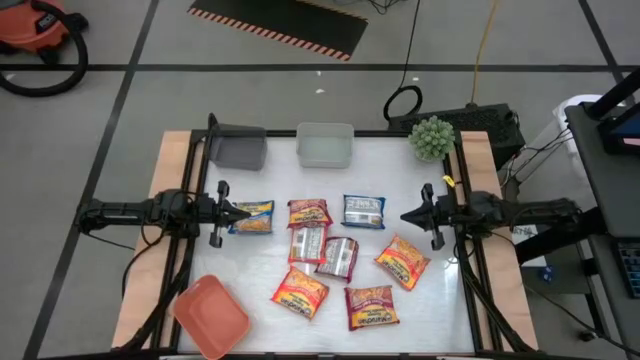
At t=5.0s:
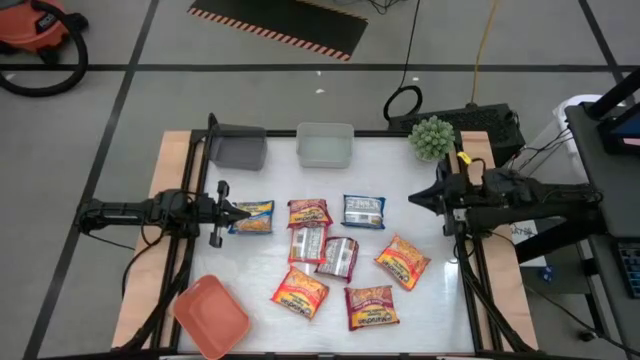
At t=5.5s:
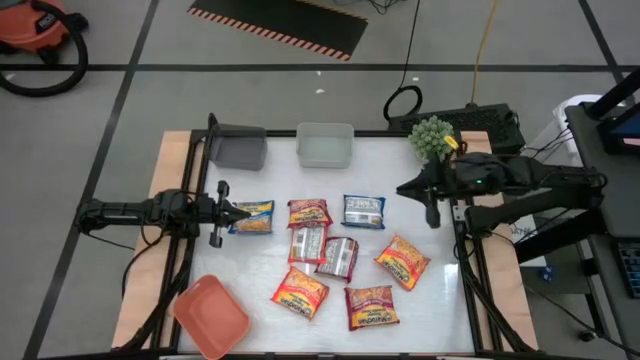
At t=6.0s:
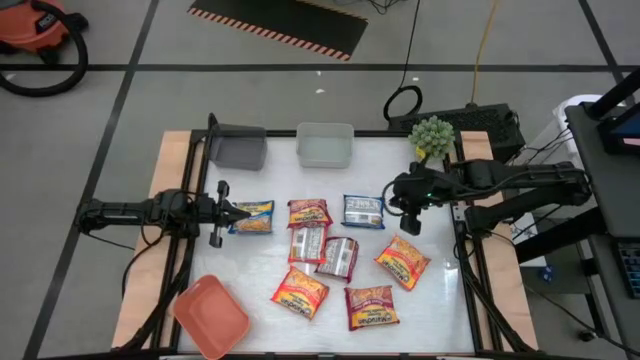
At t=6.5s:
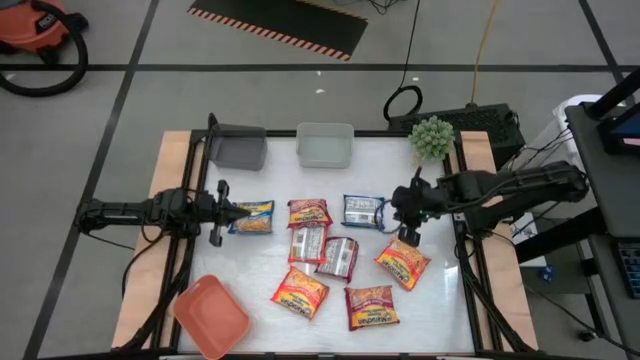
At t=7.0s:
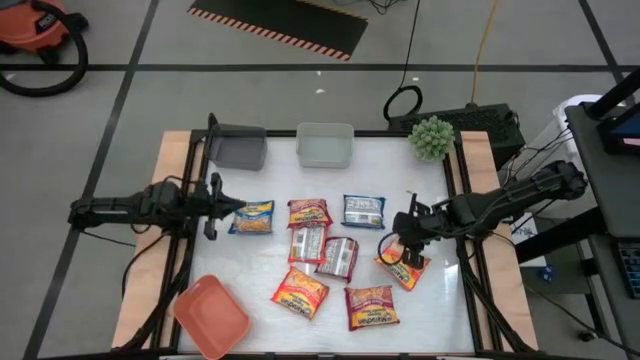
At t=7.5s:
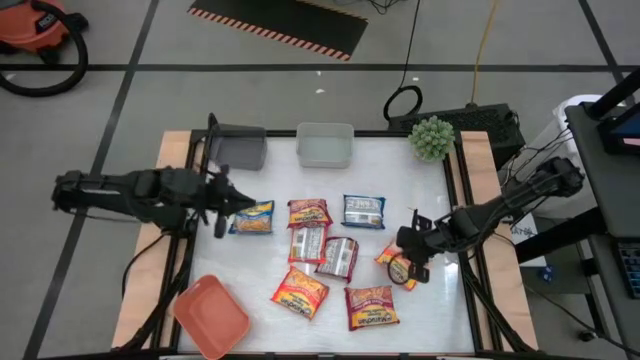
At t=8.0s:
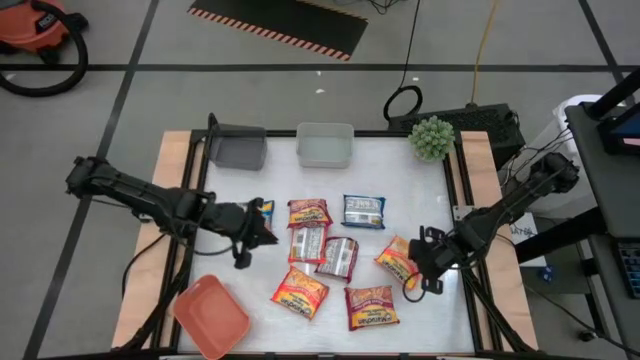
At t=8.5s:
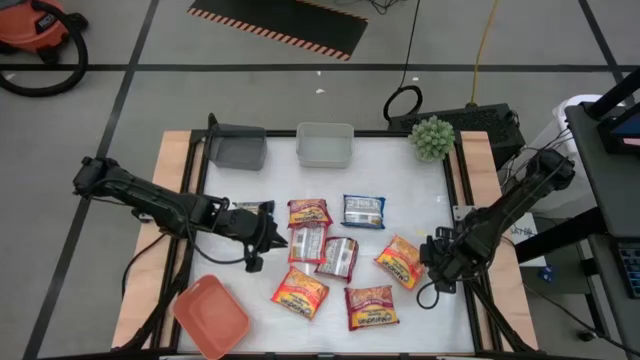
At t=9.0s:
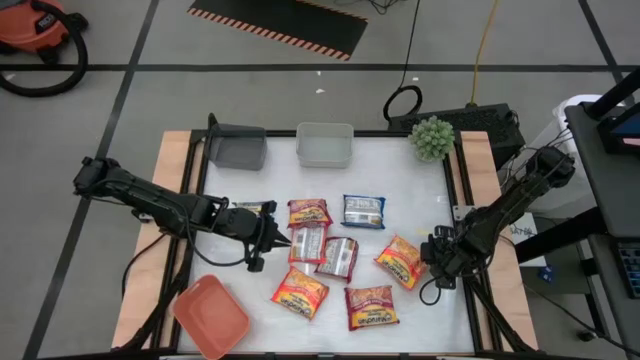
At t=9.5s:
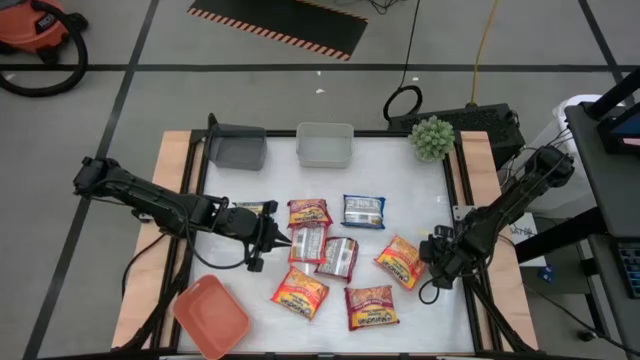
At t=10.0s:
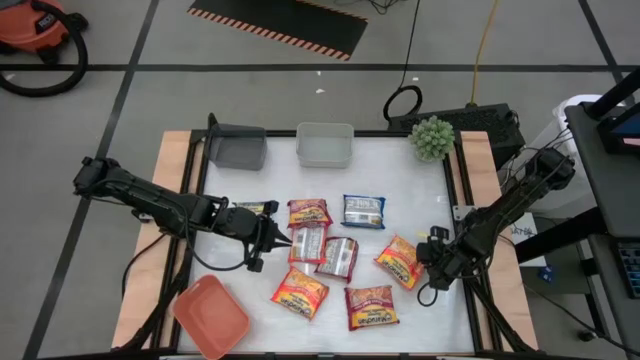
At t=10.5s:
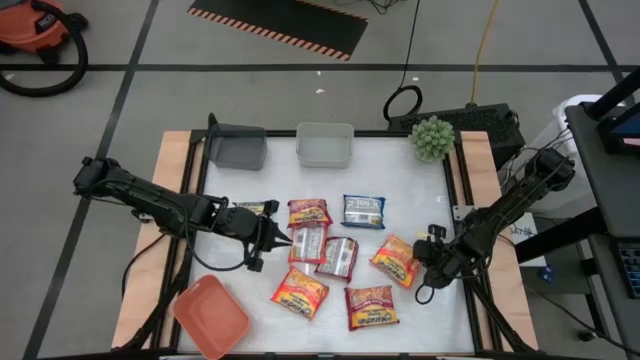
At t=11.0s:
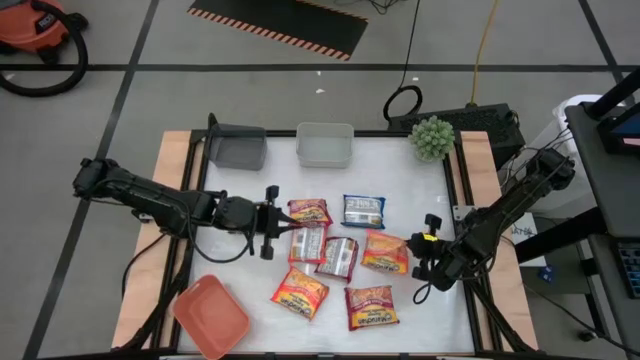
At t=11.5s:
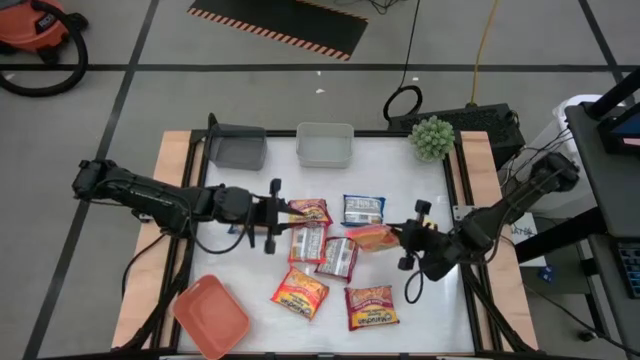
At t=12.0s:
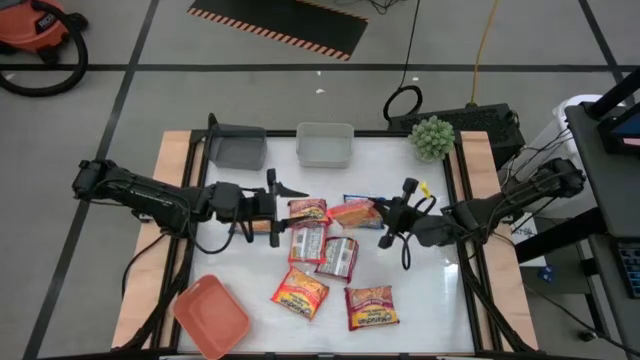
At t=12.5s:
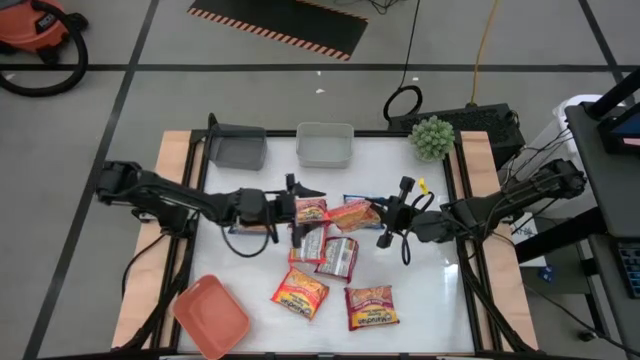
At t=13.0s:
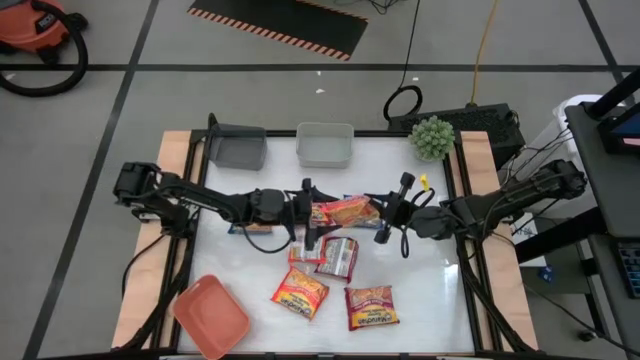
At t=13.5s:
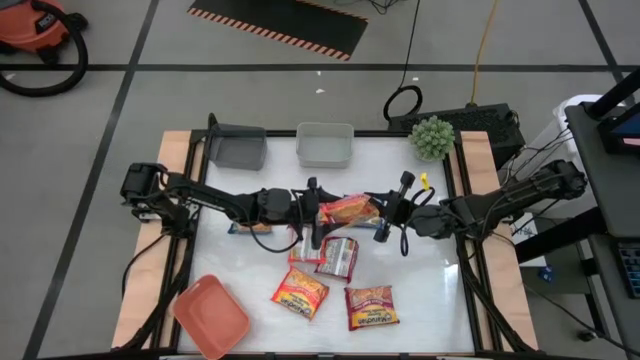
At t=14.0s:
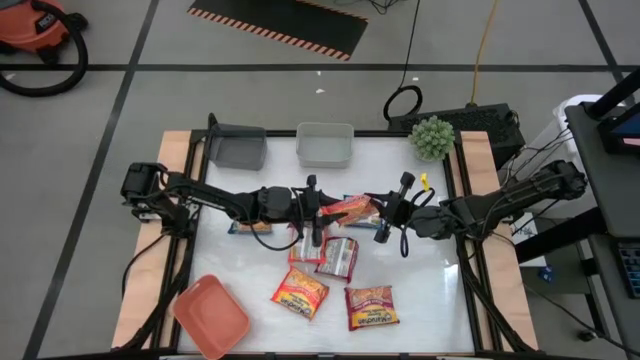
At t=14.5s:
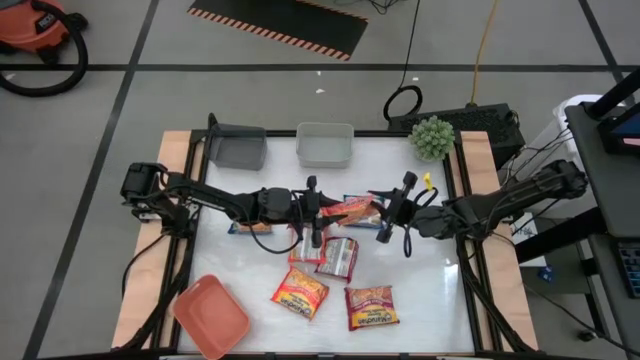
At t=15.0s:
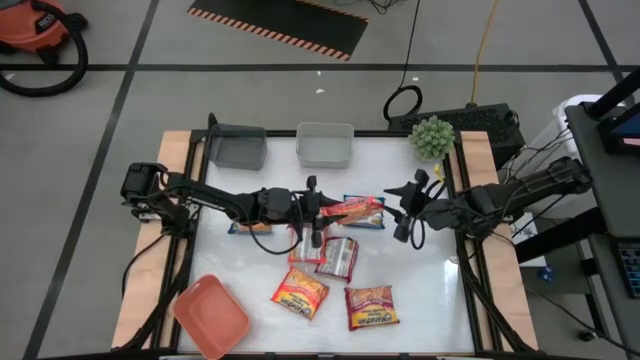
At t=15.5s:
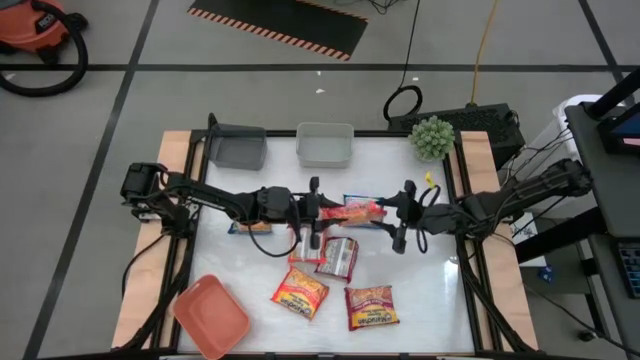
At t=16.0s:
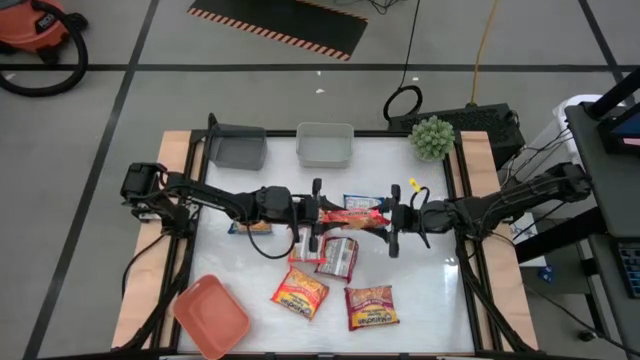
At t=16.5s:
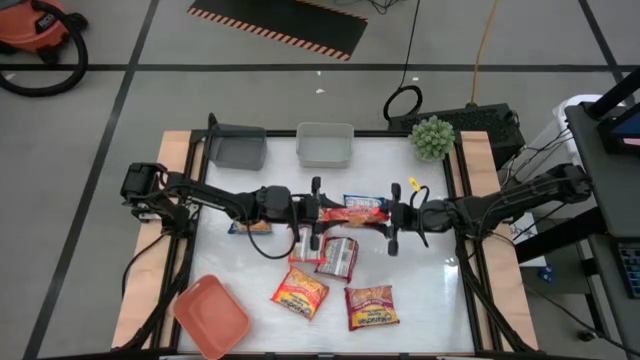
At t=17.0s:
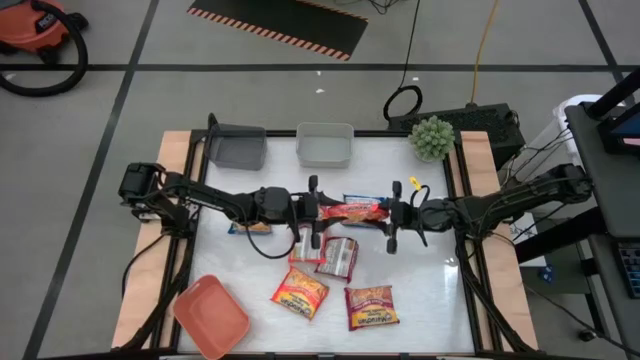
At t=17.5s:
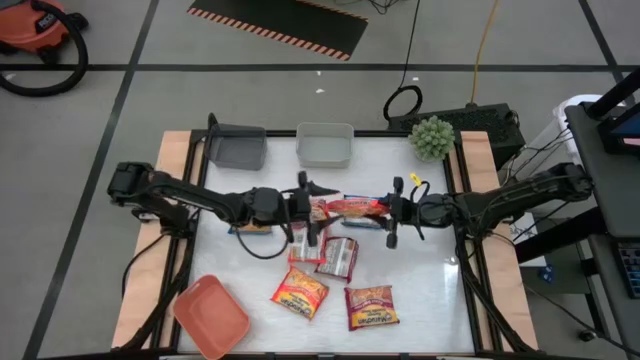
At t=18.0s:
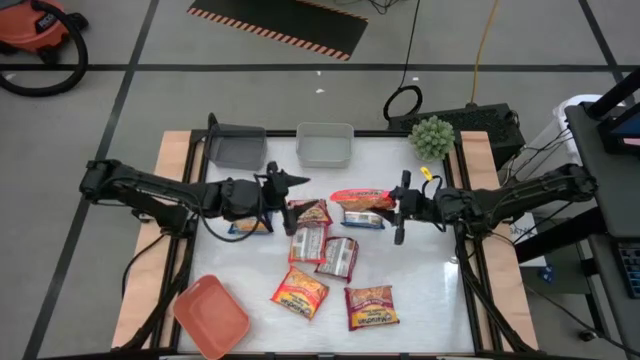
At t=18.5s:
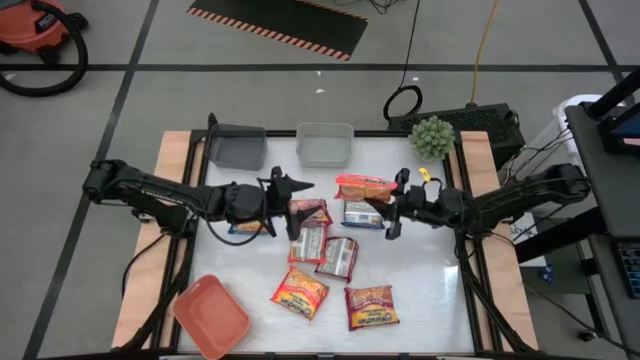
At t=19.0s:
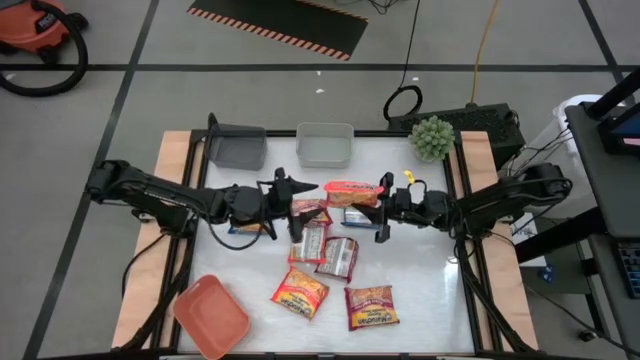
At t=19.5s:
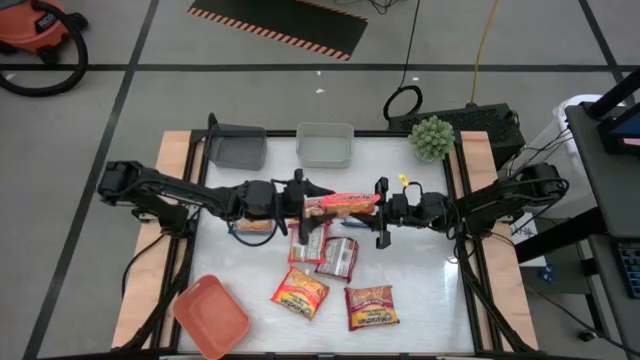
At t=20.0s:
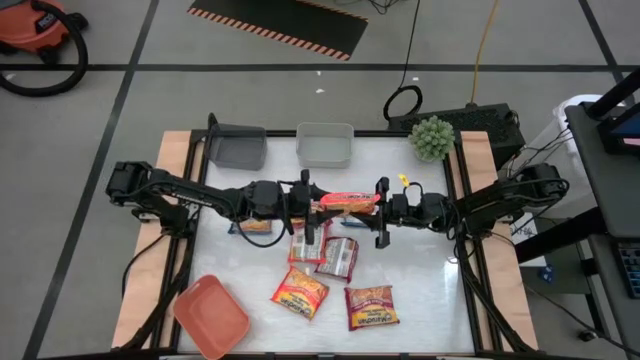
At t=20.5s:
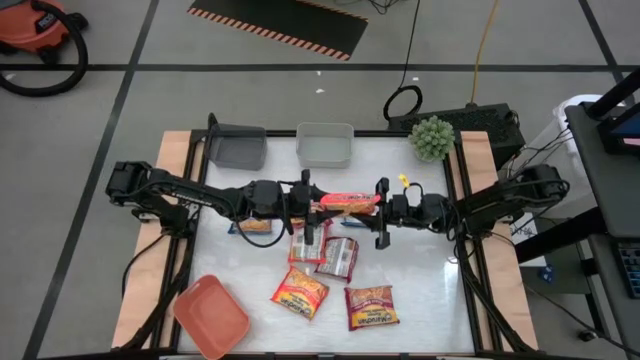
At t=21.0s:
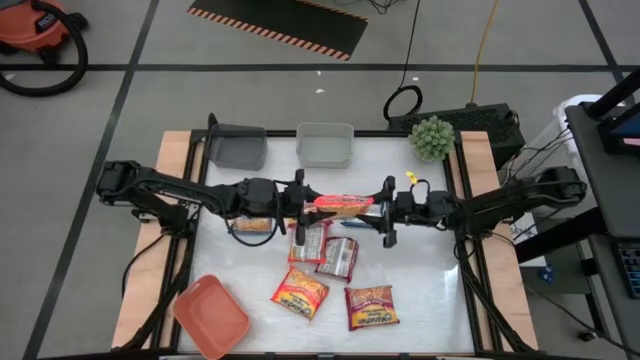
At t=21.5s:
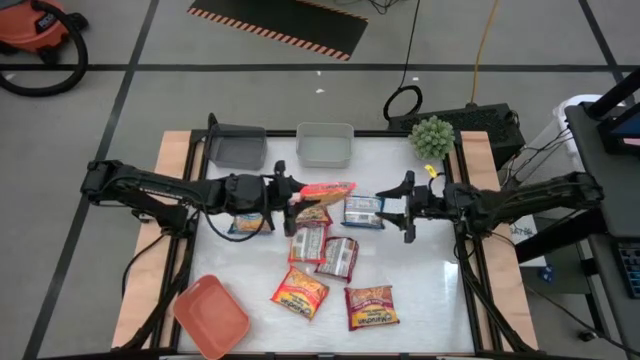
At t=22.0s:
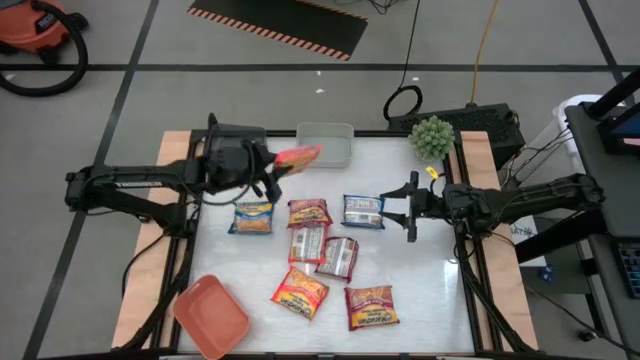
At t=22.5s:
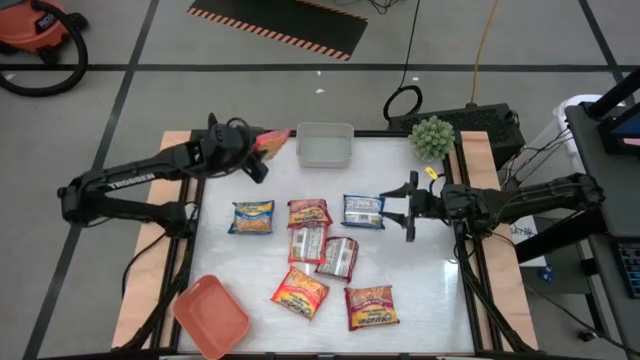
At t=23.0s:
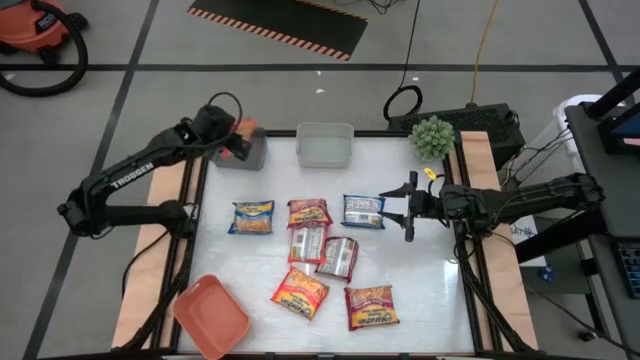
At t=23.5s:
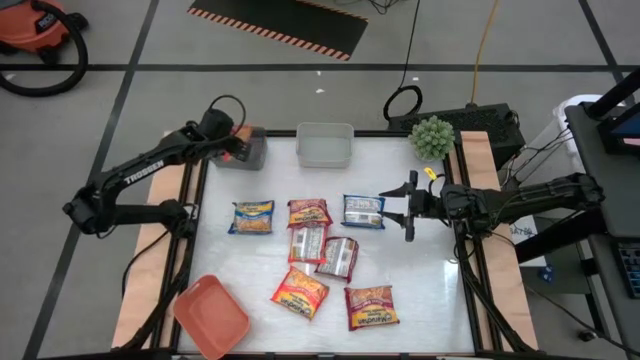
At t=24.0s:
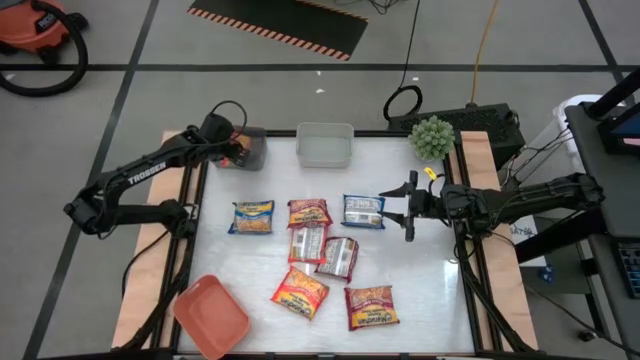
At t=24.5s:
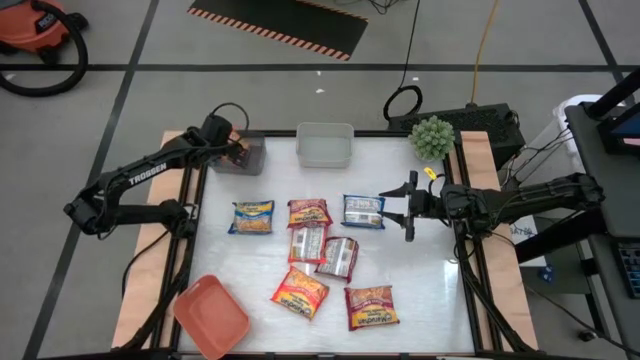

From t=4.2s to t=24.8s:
Task: Sort Maruchan noodles
Put the right orange noodle pack into the black bin
